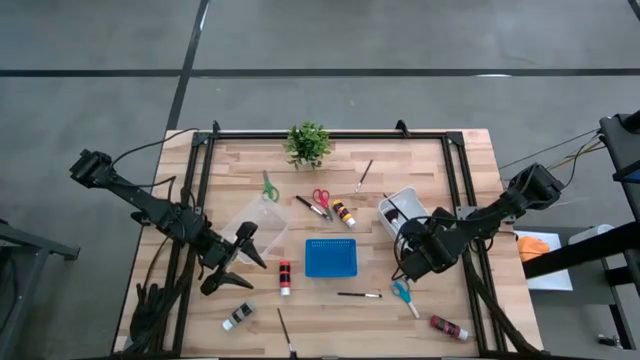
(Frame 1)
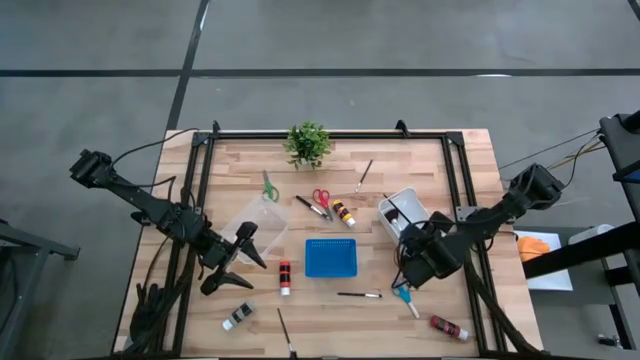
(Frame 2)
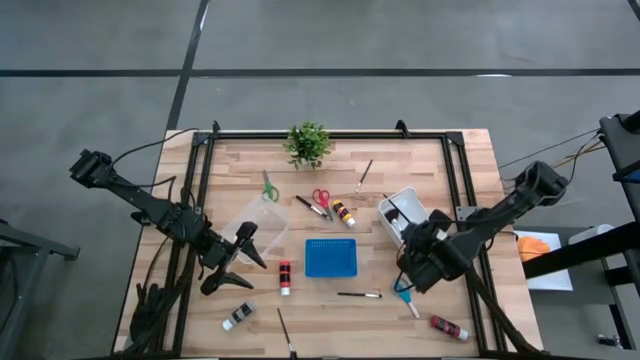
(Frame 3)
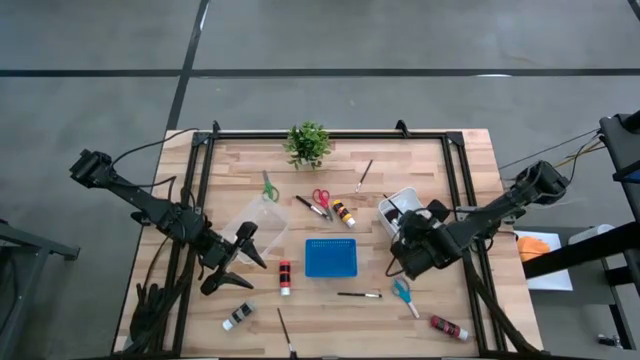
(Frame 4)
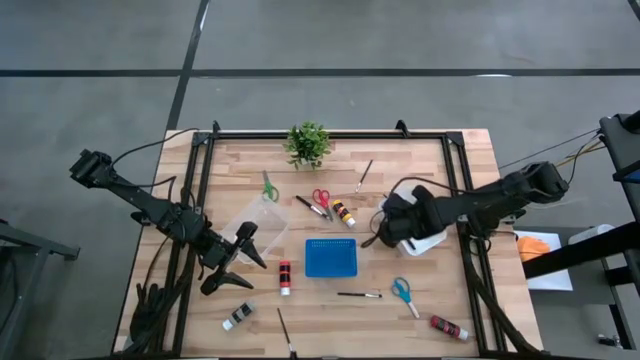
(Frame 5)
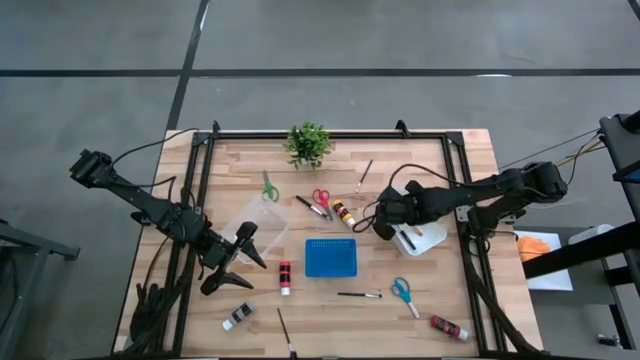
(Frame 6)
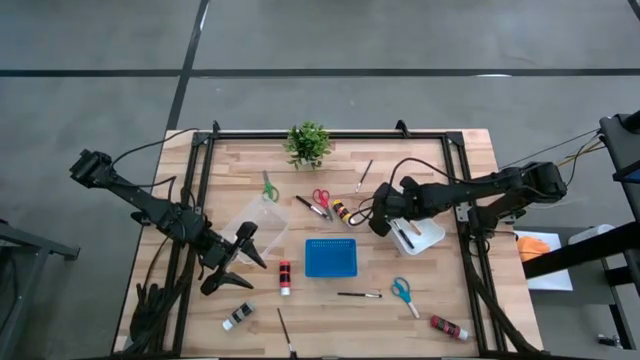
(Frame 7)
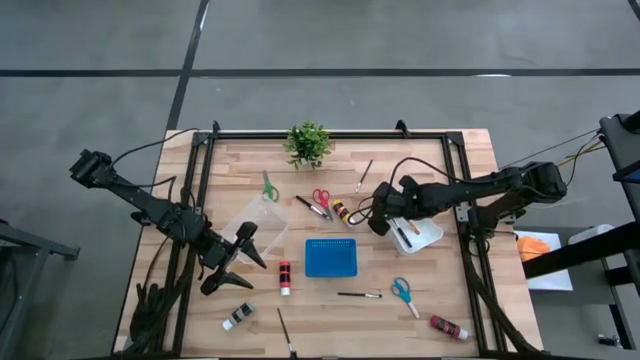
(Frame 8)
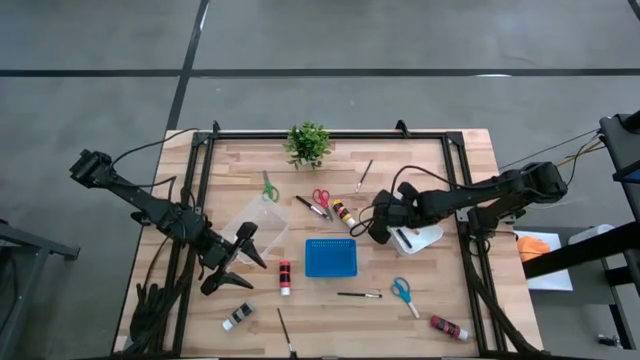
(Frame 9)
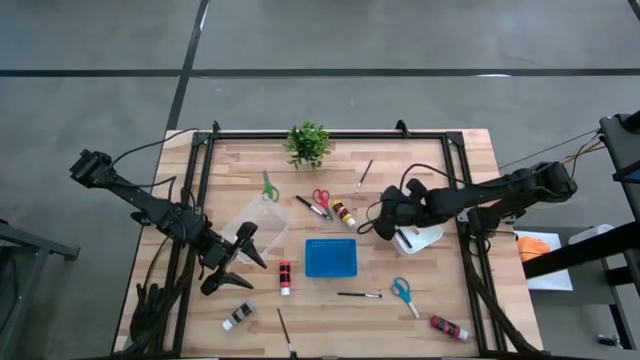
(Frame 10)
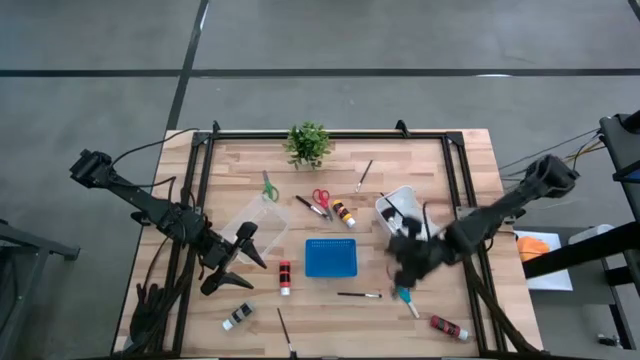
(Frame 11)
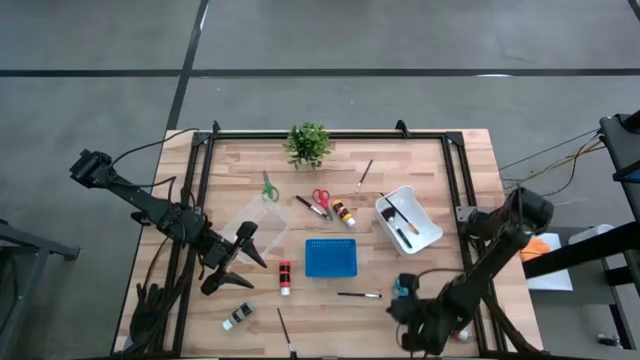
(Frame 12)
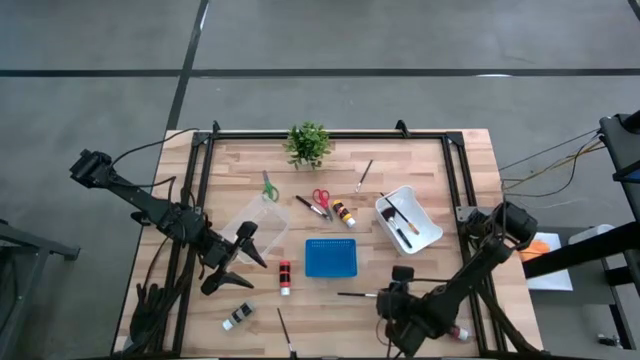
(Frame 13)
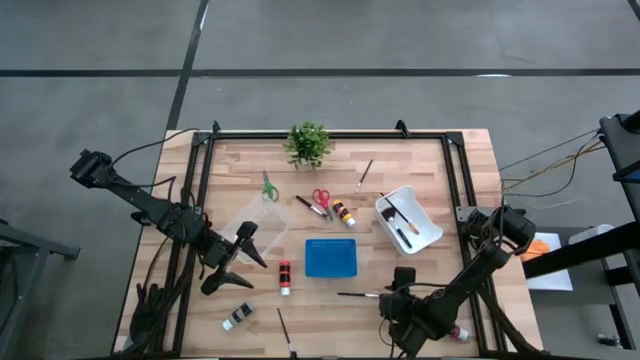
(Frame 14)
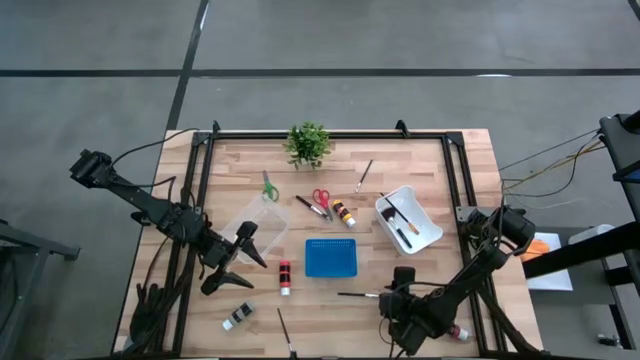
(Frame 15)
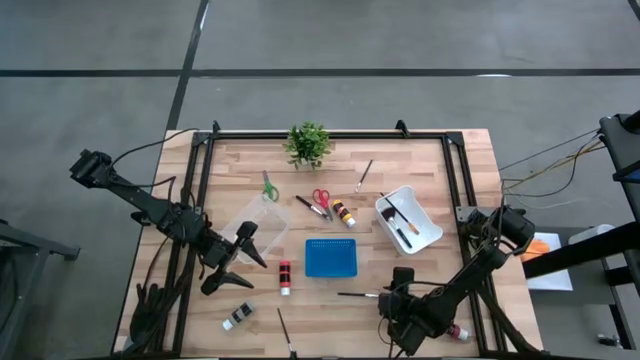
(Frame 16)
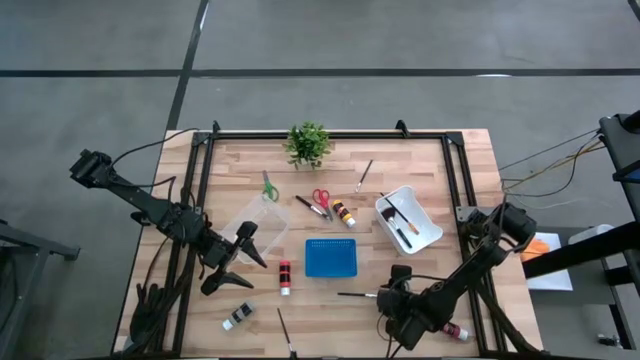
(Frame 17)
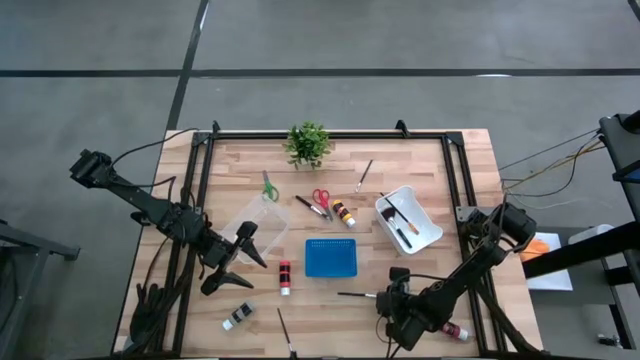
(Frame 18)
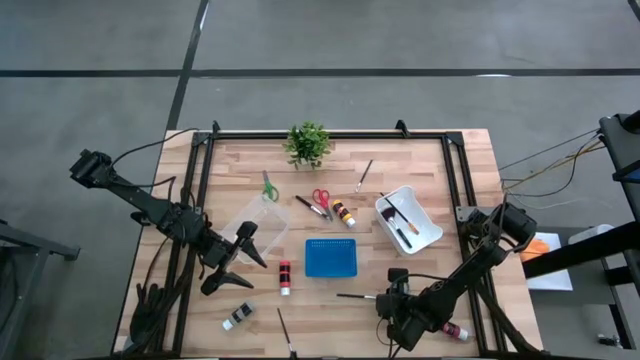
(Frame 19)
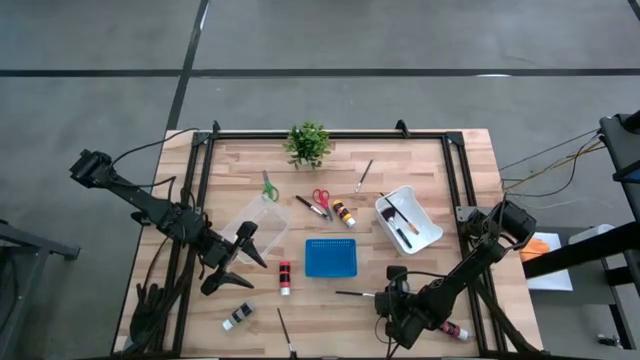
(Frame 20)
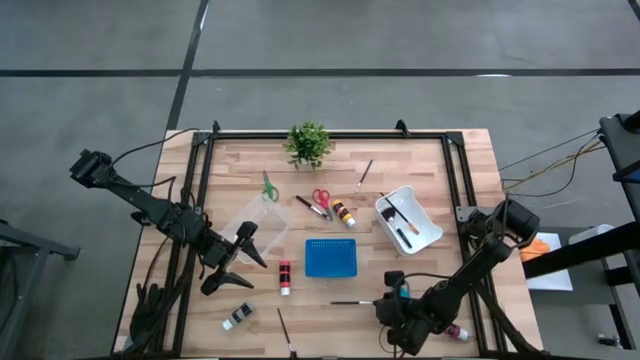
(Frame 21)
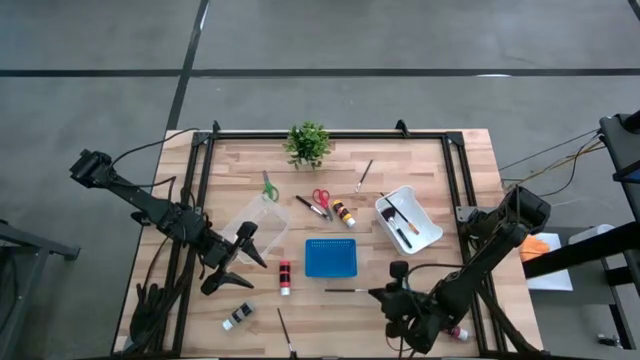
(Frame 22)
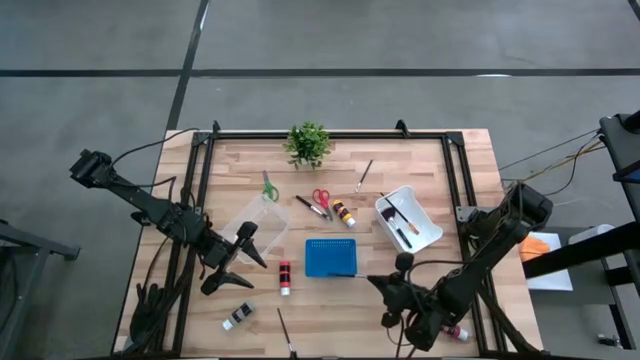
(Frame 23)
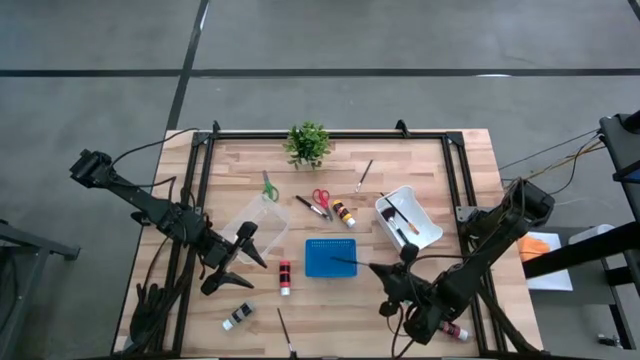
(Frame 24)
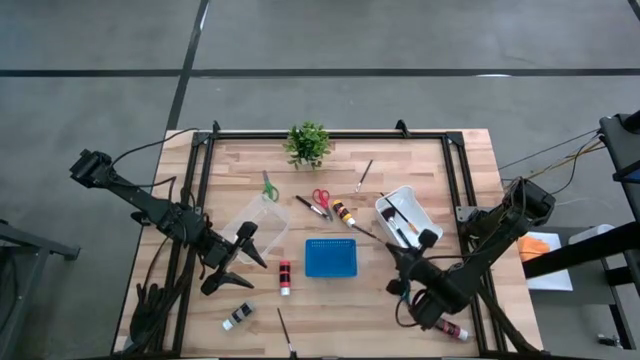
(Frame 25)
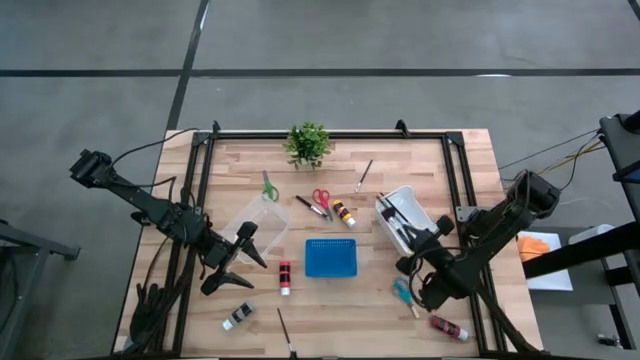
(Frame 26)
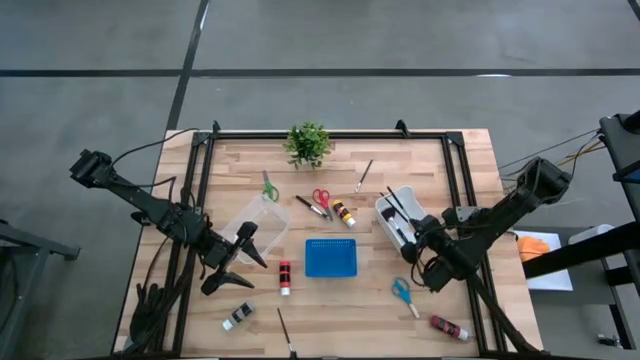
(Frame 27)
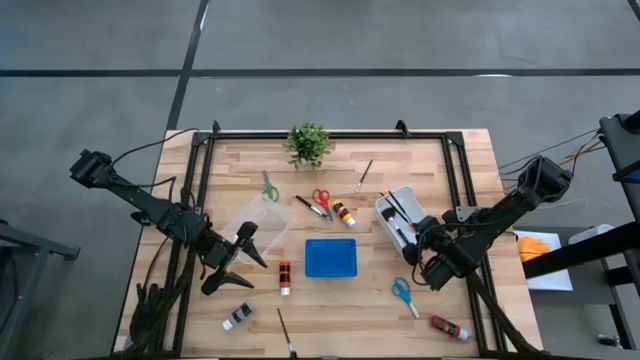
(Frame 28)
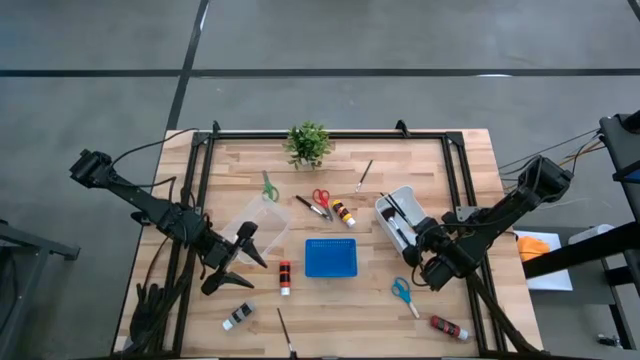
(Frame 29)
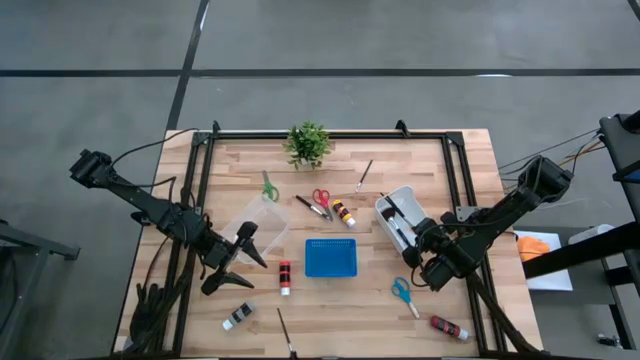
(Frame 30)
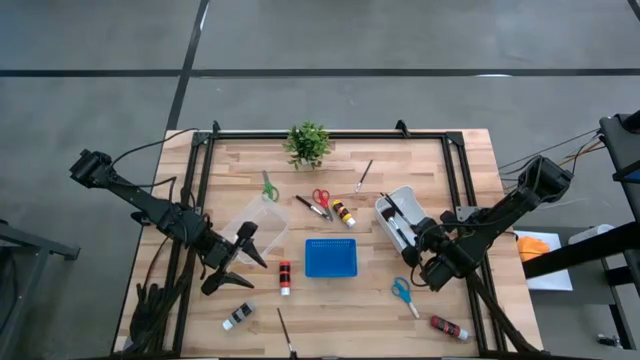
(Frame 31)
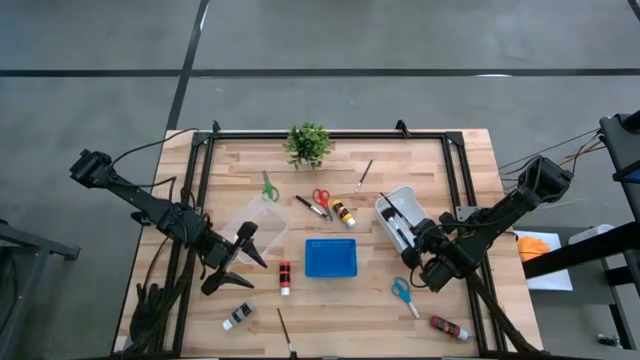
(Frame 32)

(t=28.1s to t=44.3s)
Task: Pick & Place Paint Supplies
Put the bottom eyeshadow brush in the white bin

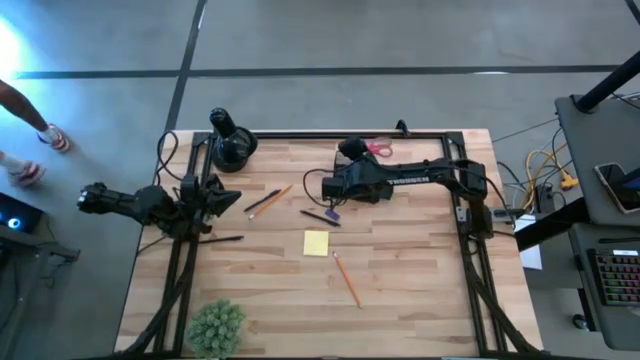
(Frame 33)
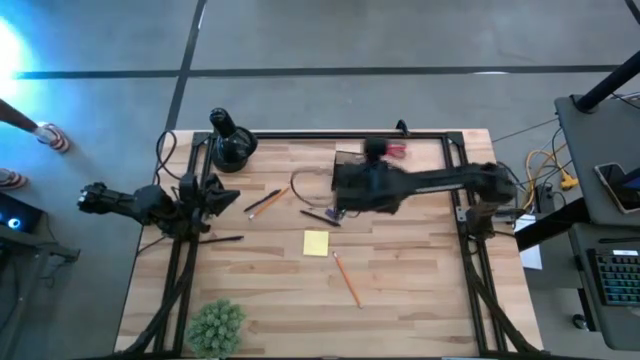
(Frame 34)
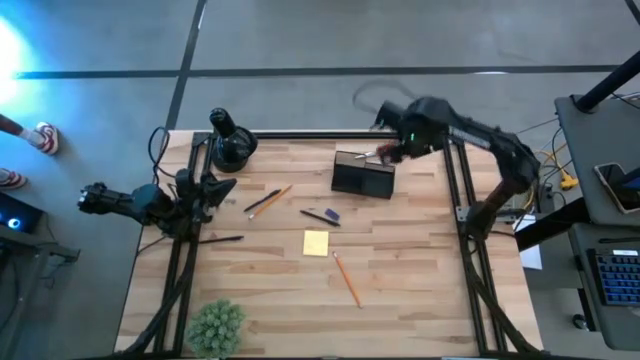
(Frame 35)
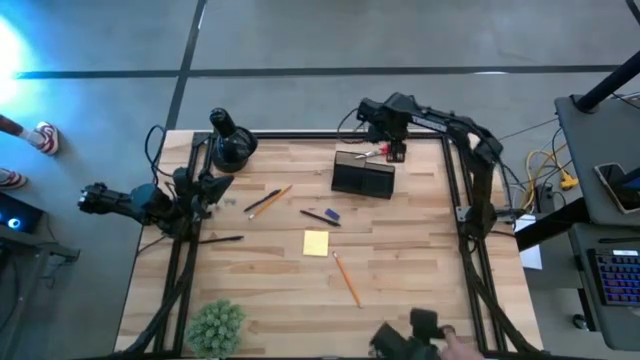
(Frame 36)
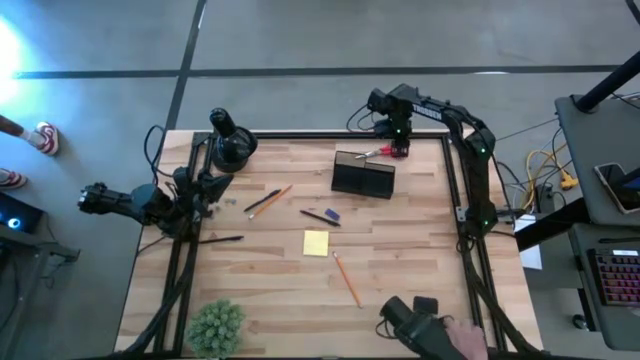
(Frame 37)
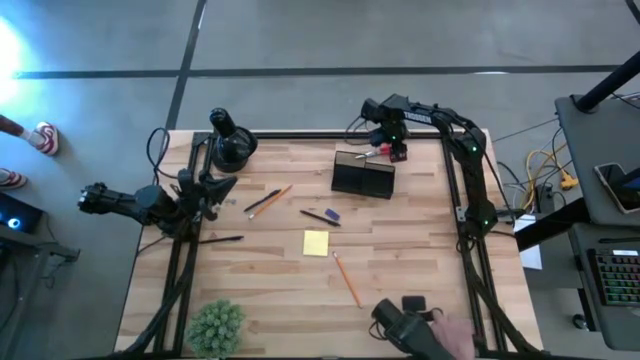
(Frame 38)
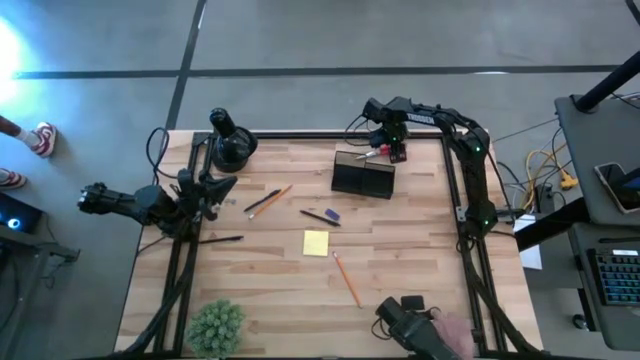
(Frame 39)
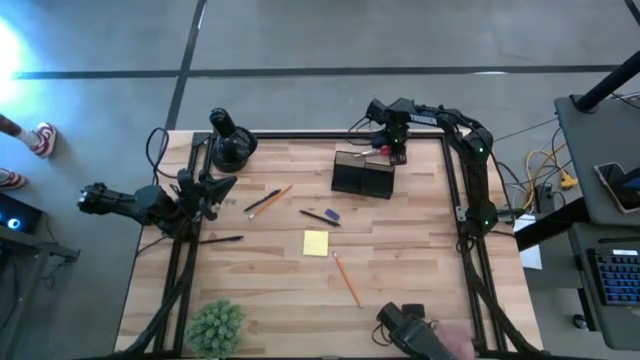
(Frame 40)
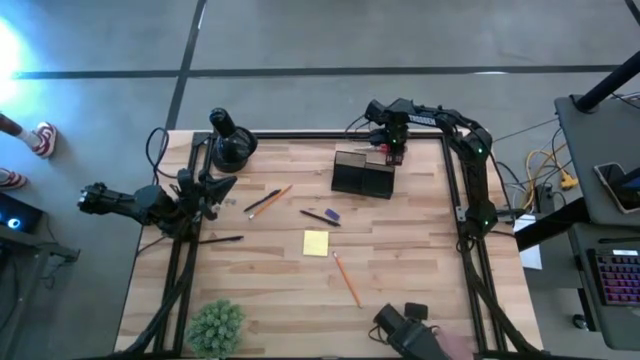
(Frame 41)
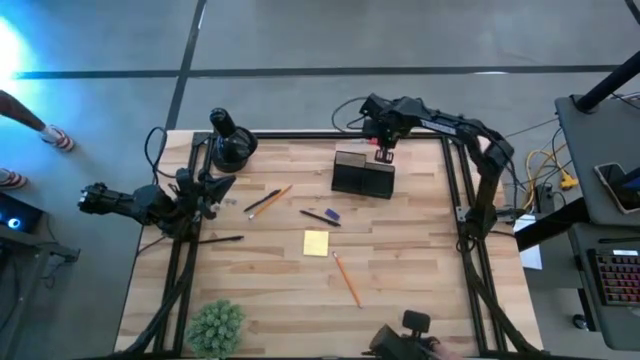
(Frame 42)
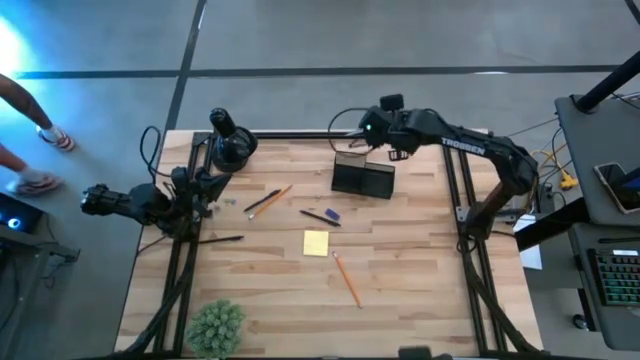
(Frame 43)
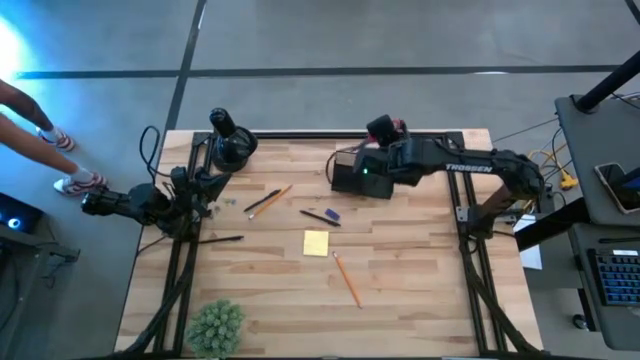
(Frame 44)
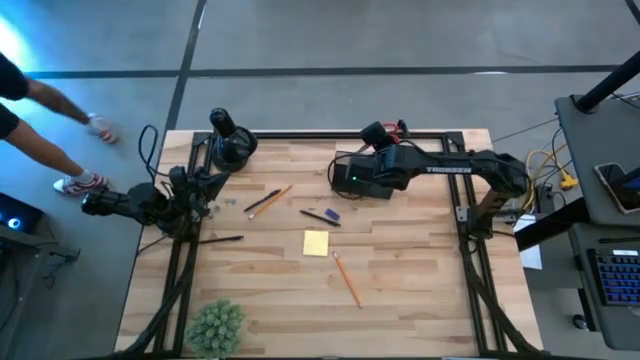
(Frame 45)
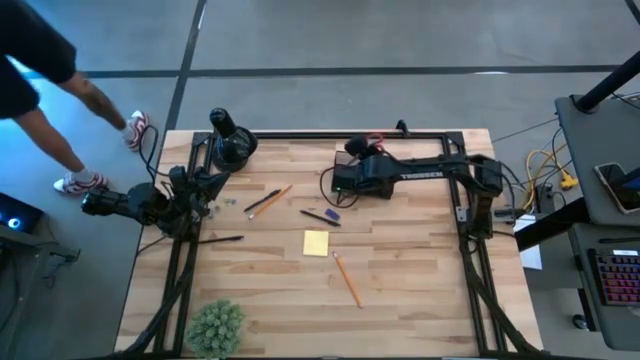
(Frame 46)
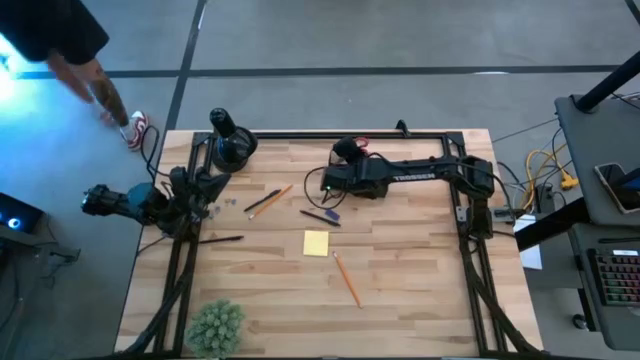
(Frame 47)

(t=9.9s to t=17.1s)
Task: Pick and place office supplies into organizer
Put the scissors into the desk organizer
